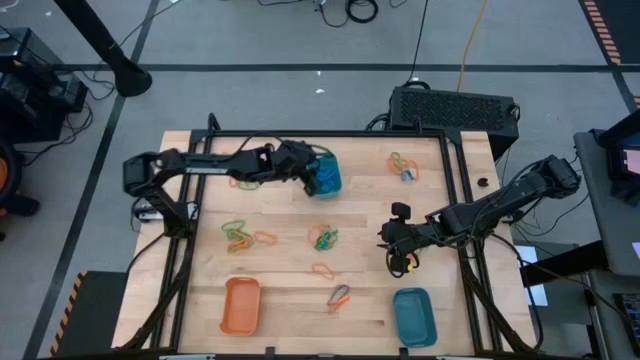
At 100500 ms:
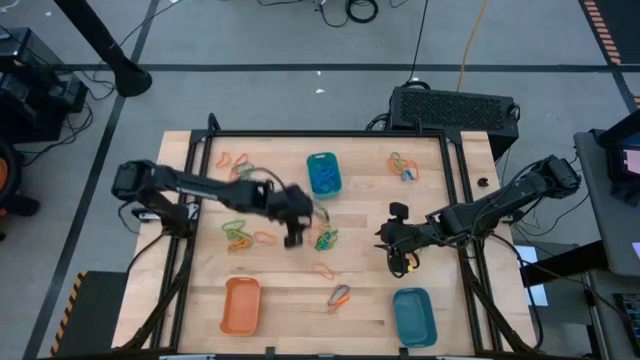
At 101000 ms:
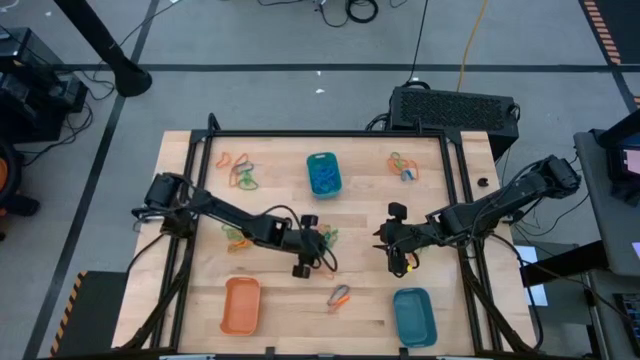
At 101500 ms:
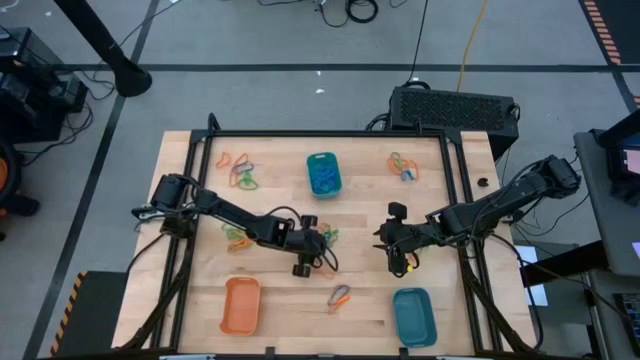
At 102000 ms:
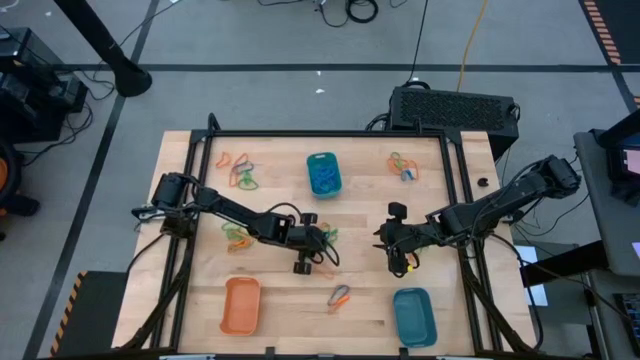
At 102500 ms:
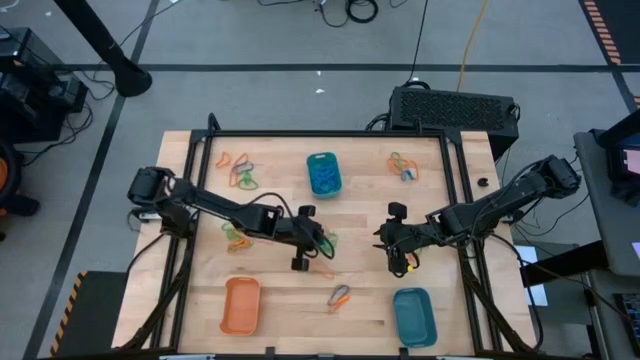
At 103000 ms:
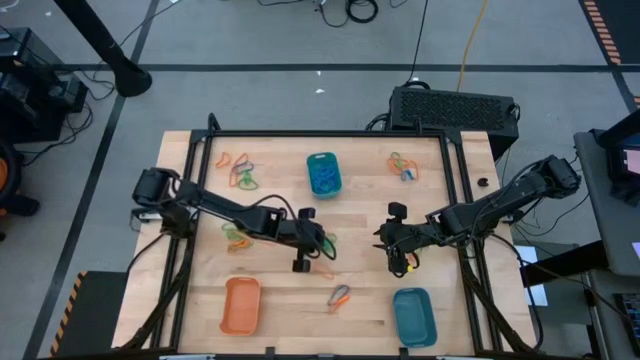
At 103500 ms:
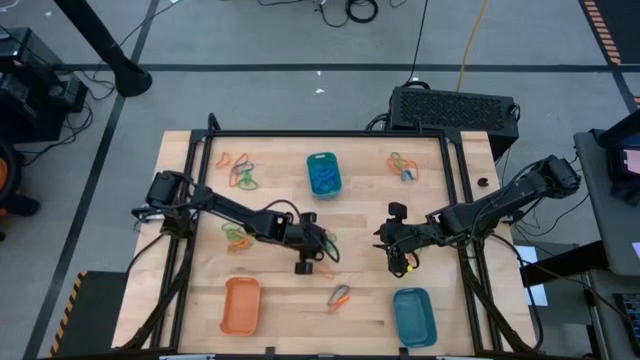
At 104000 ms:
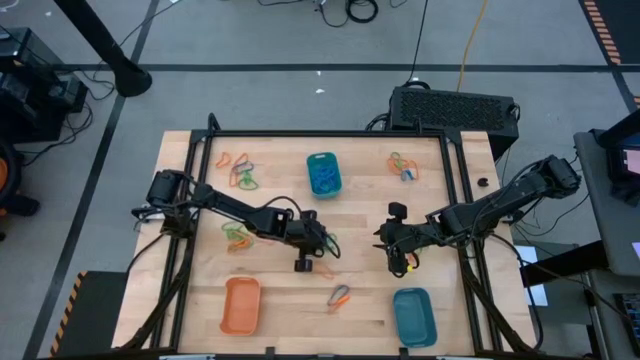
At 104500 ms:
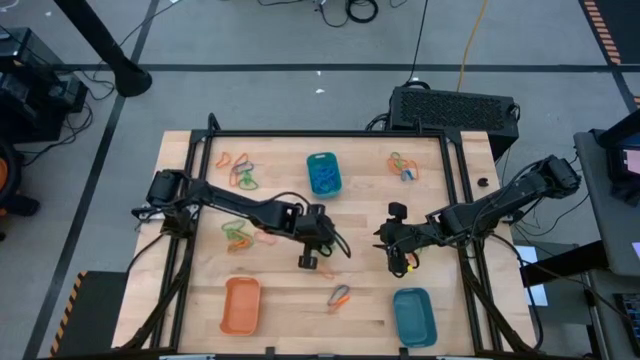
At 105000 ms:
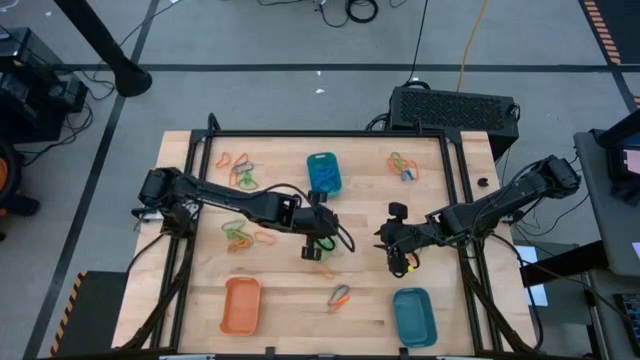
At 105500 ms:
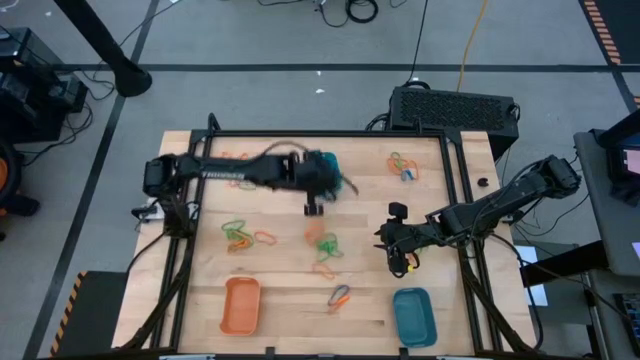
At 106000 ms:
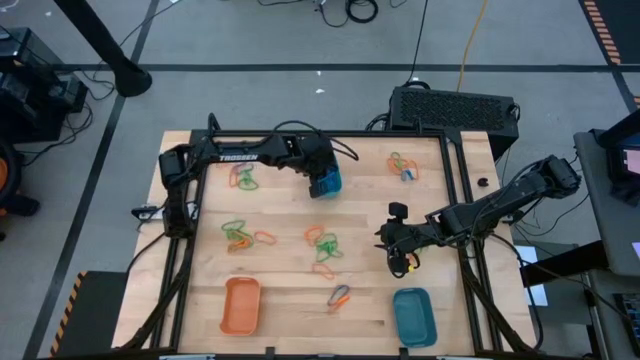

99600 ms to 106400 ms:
Task: Sort rubber bands into baskets
Put the blue rubber band into the top blue bin

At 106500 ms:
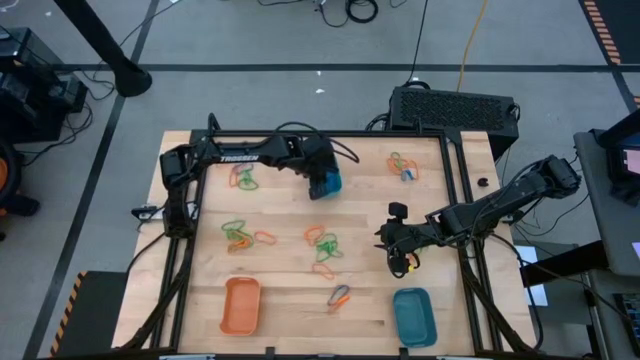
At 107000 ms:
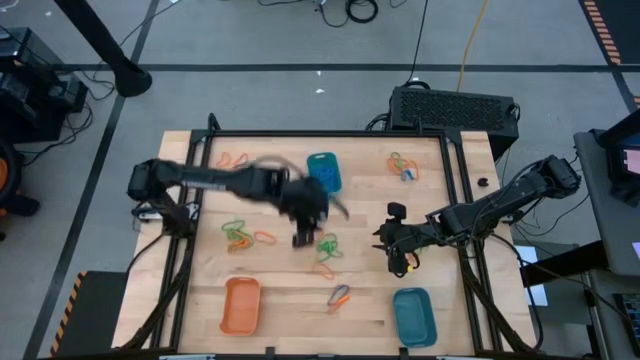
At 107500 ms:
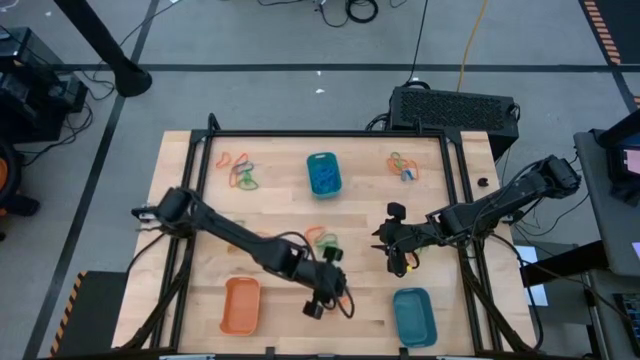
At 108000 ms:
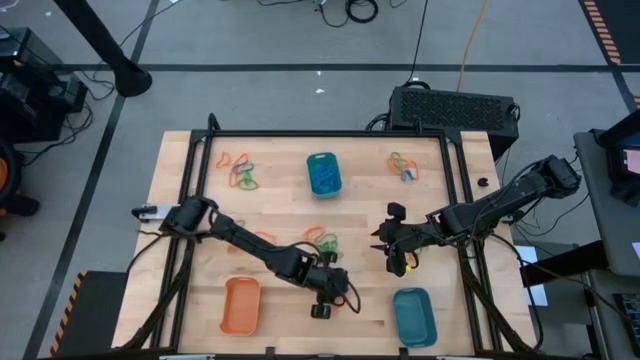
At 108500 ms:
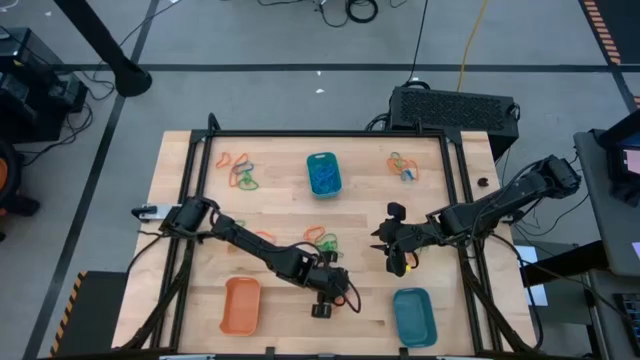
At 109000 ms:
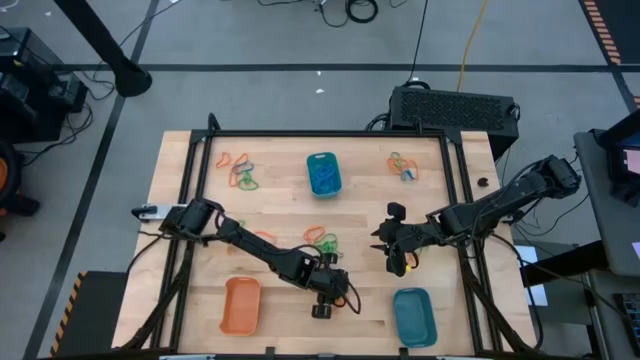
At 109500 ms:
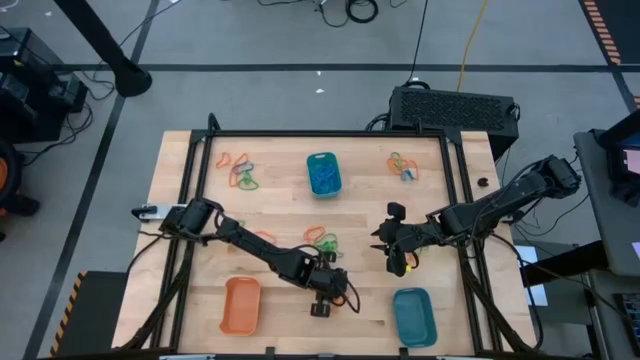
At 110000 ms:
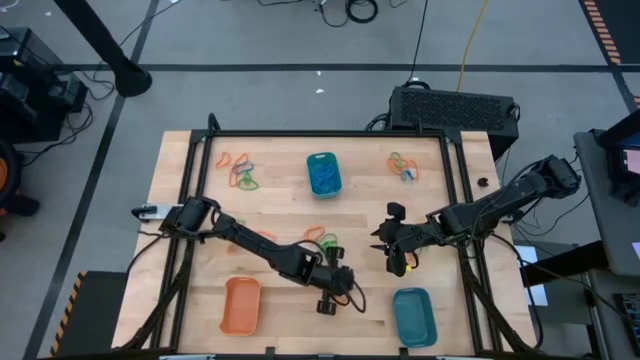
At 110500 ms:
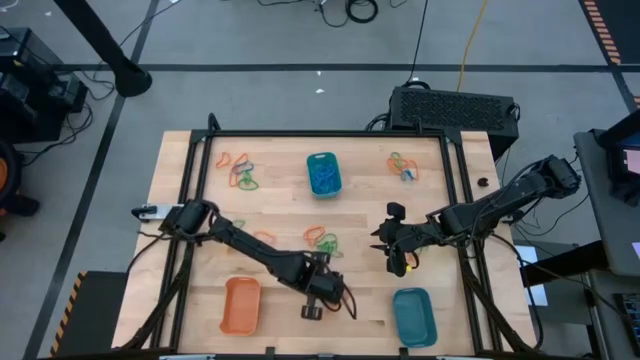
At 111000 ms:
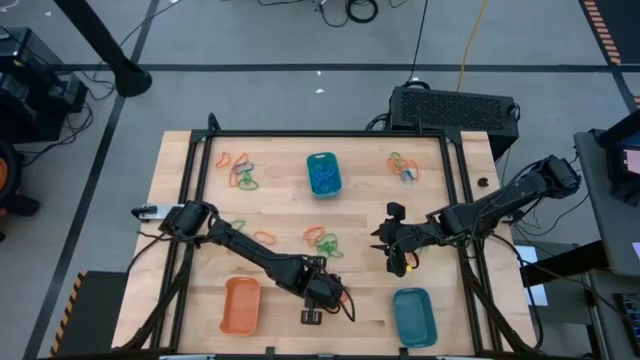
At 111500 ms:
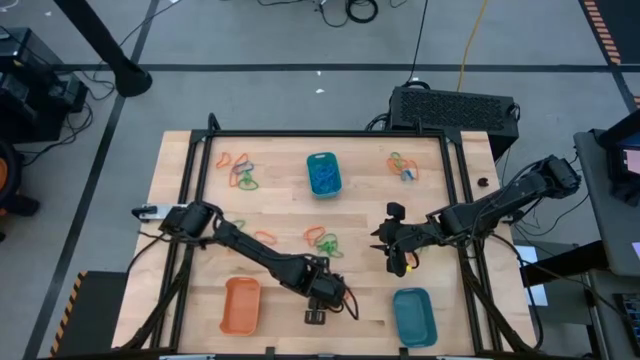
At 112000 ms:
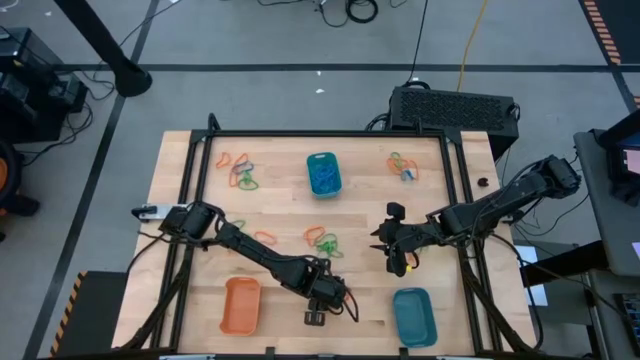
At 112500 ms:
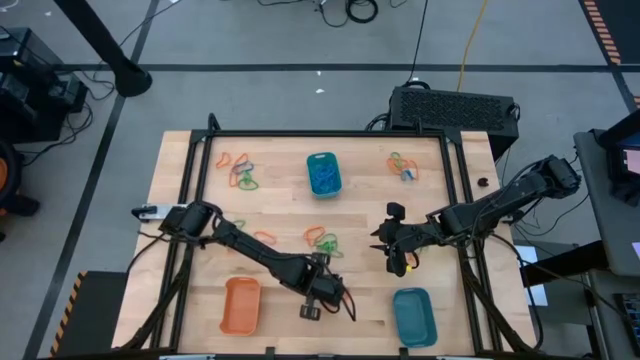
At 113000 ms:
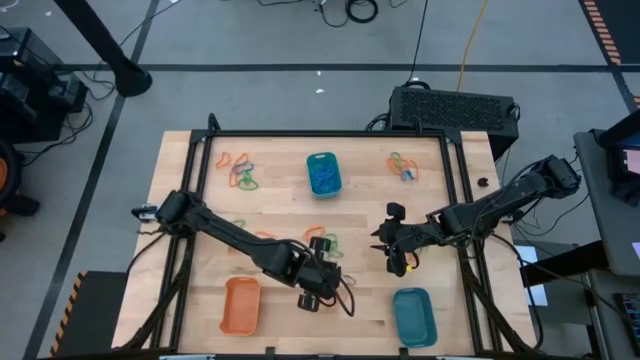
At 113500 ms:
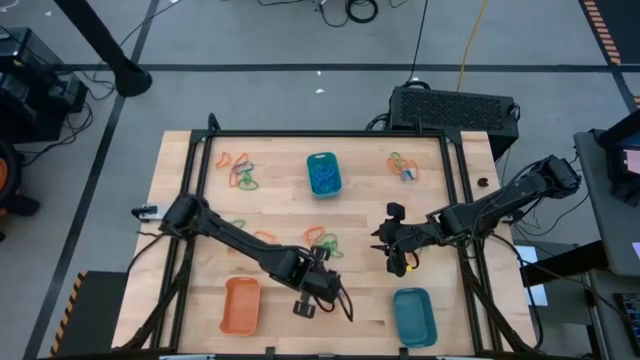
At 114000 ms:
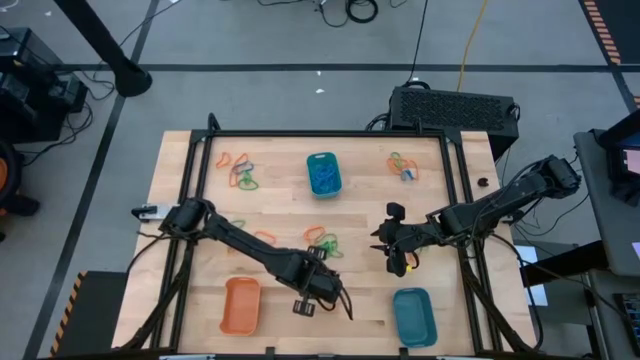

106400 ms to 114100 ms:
Put the blue rubber band into the top blue bin

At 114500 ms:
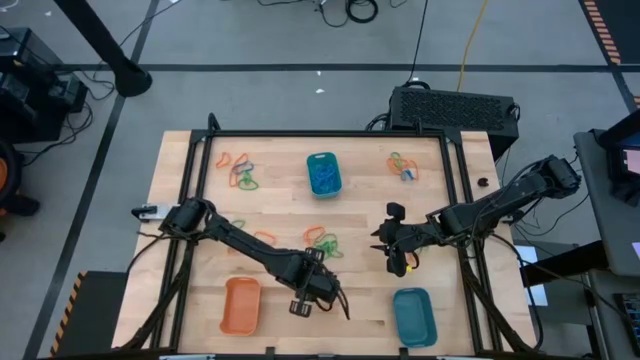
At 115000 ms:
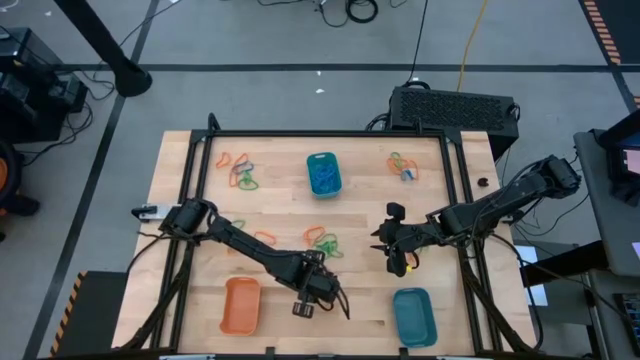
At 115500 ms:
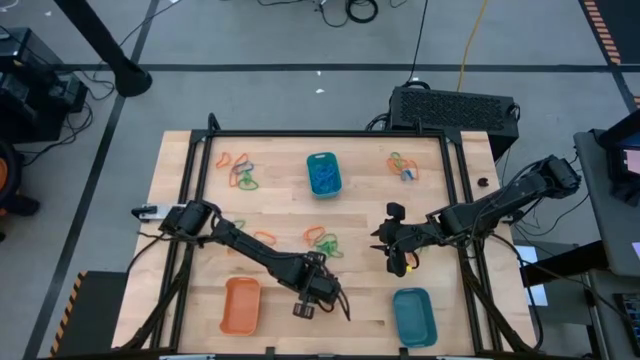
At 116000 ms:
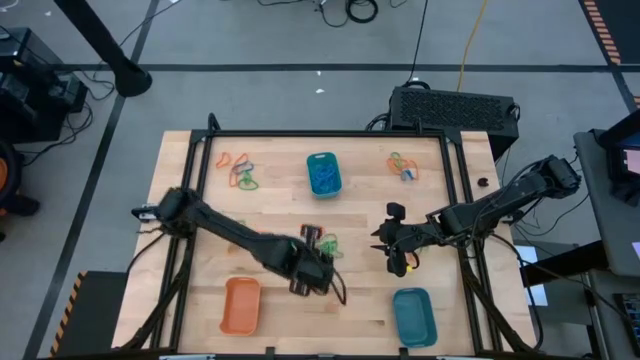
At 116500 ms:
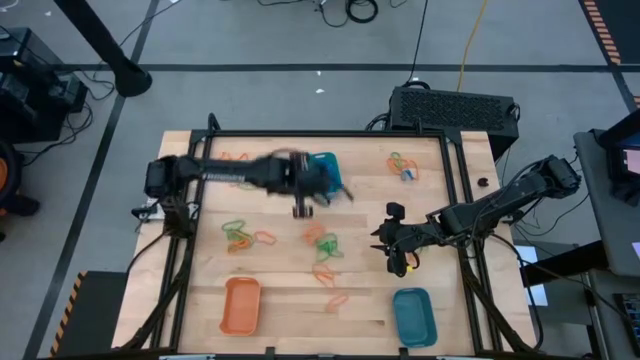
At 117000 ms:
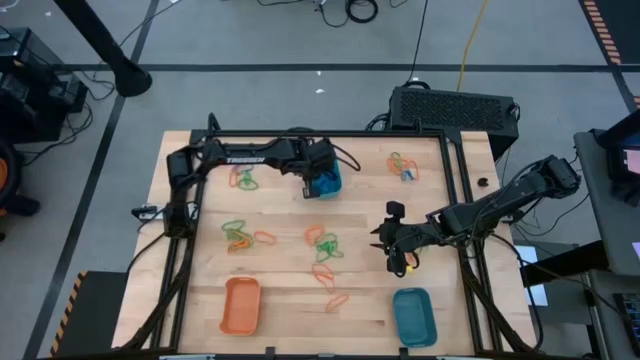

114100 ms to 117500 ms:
Put the blue rubber band into the top blue bin

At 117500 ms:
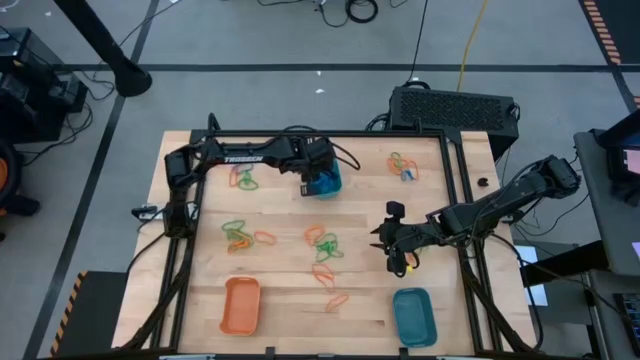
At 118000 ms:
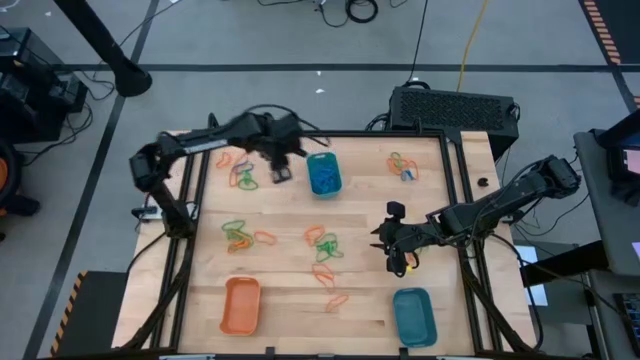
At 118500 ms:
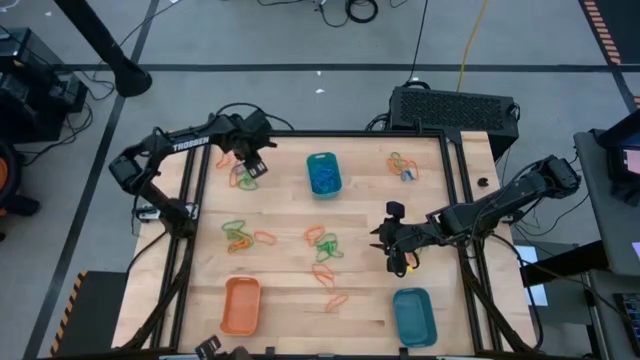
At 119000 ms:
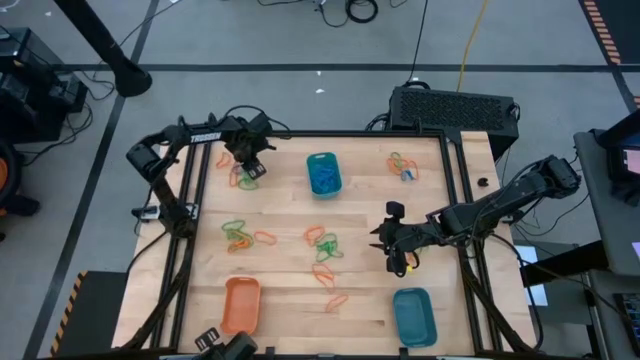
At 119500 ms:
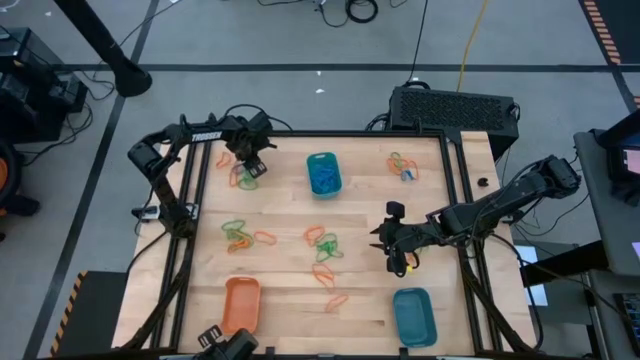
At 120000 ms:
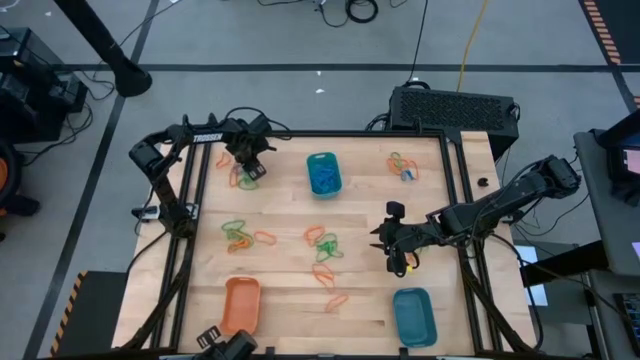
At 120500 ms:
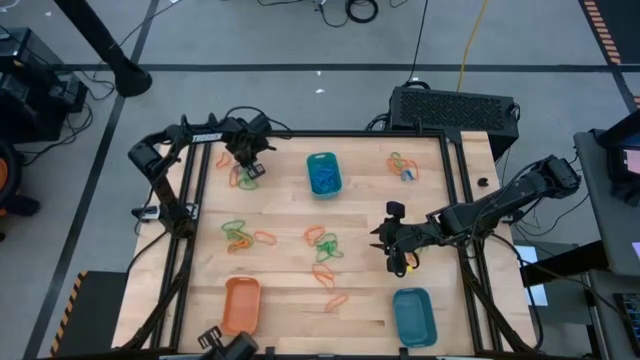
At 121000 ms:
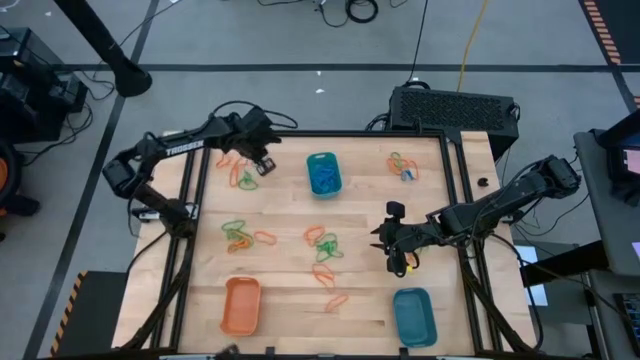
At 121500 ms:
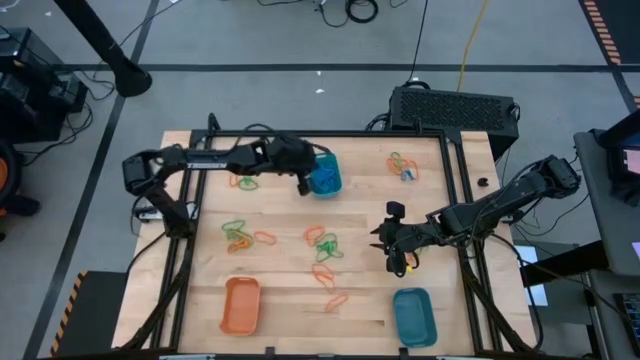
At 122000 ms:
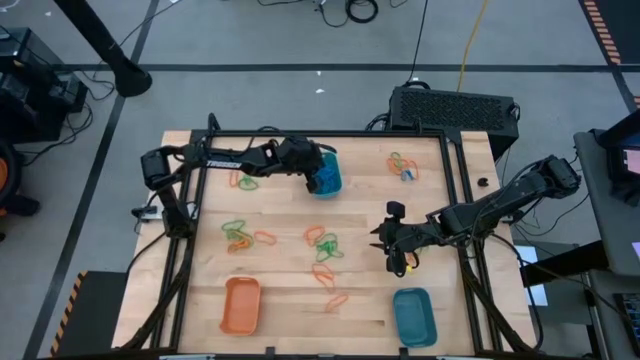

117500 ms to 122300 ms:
Put the blue rubber band into the top blue bin
